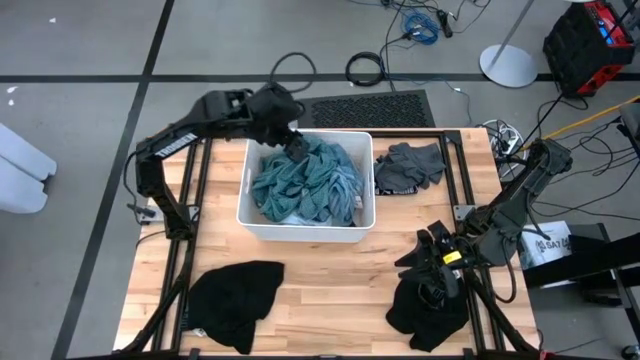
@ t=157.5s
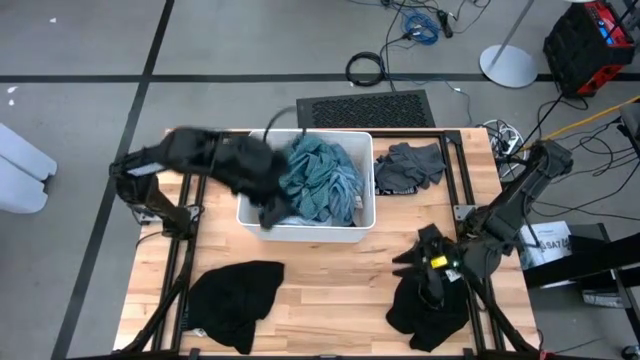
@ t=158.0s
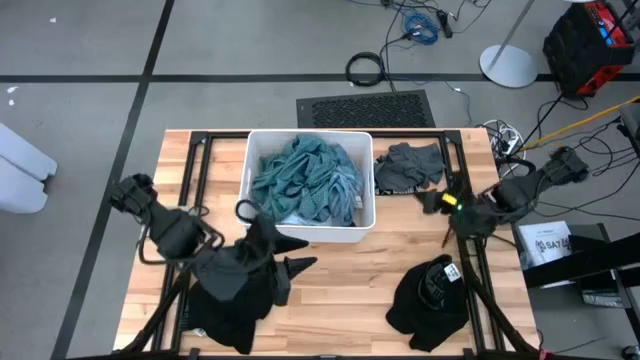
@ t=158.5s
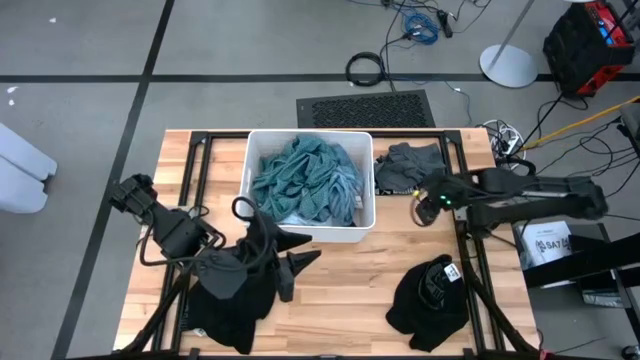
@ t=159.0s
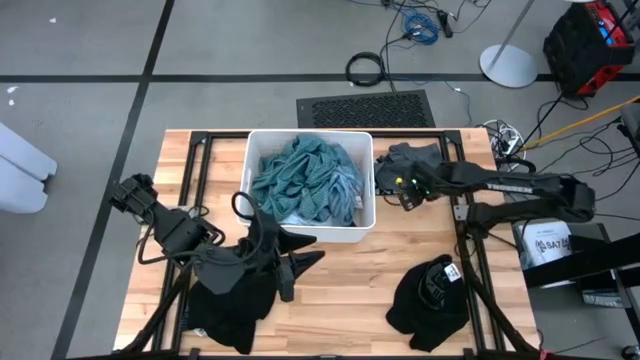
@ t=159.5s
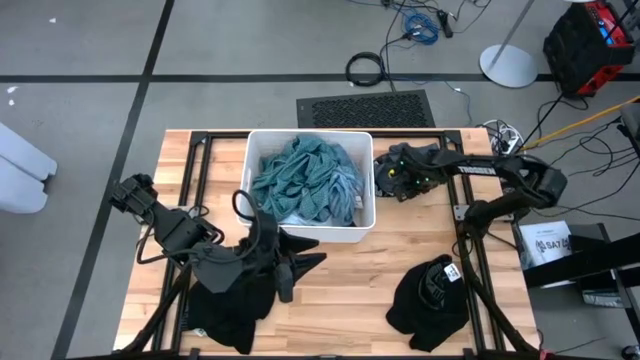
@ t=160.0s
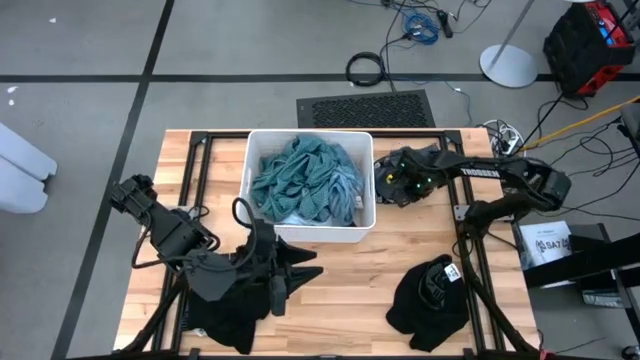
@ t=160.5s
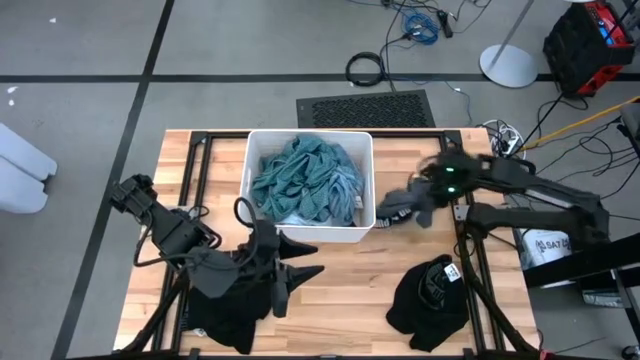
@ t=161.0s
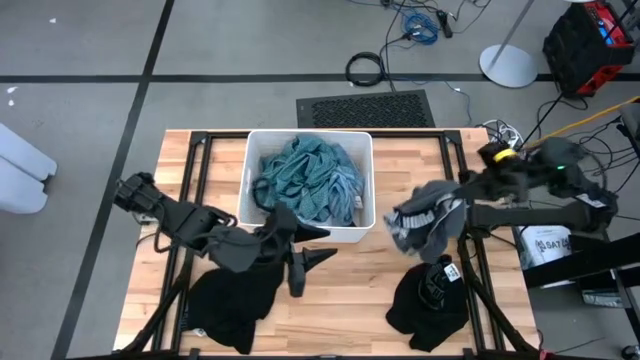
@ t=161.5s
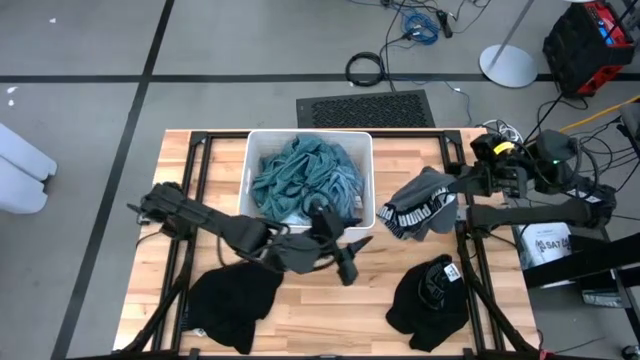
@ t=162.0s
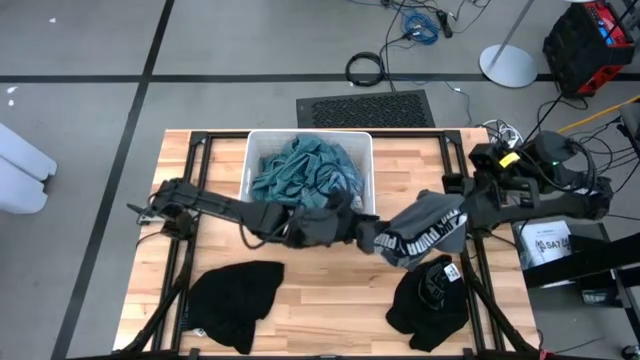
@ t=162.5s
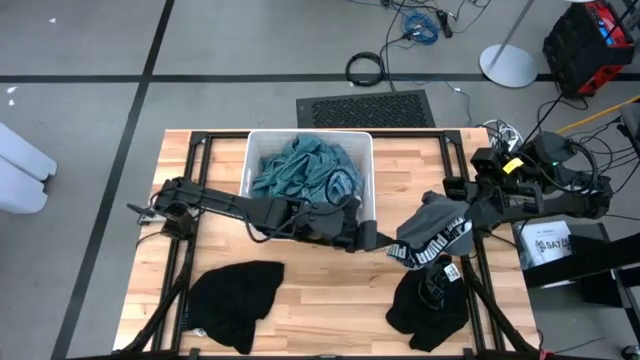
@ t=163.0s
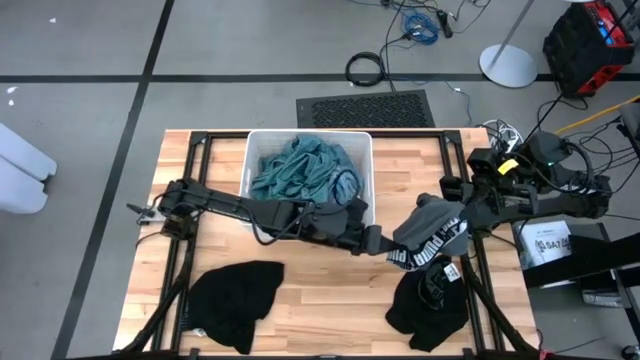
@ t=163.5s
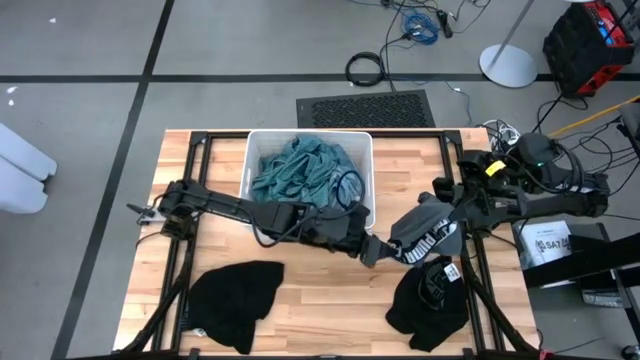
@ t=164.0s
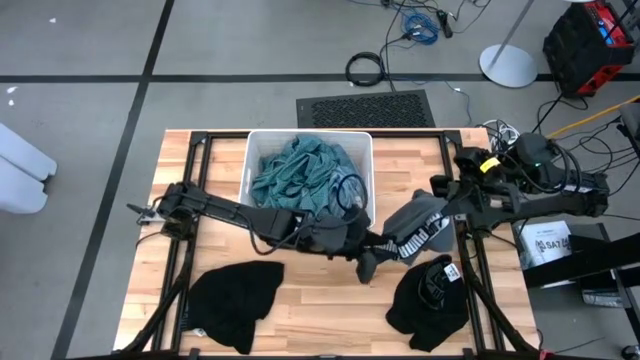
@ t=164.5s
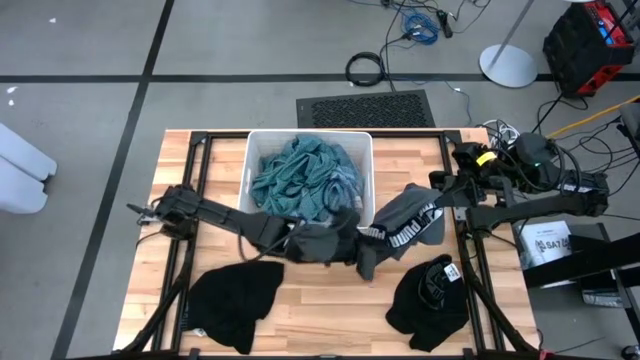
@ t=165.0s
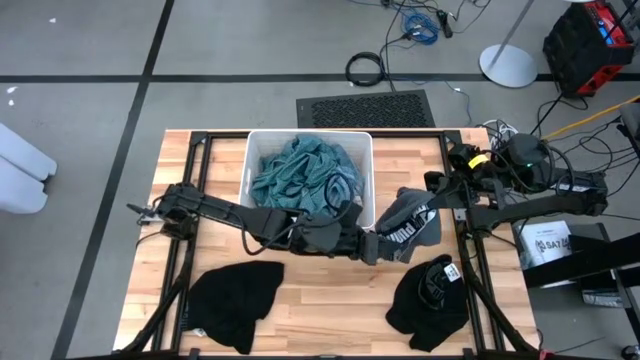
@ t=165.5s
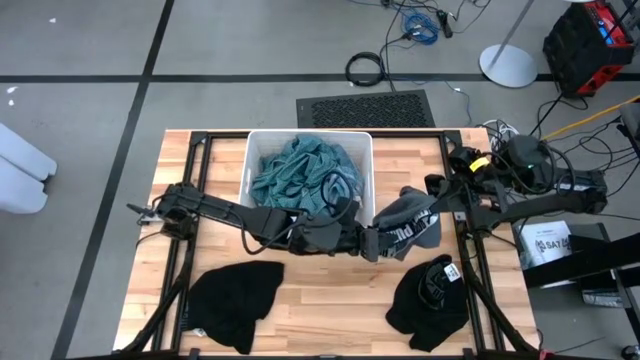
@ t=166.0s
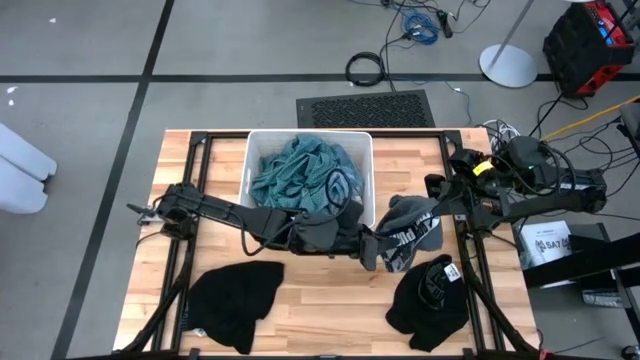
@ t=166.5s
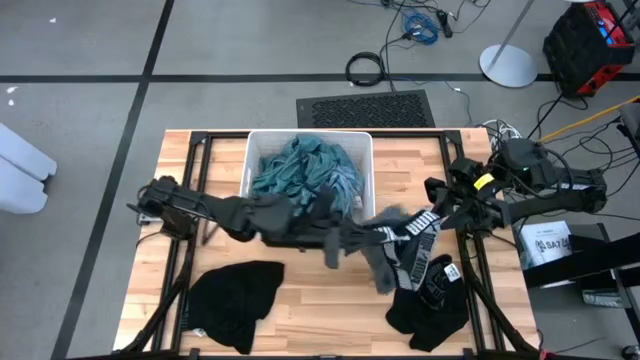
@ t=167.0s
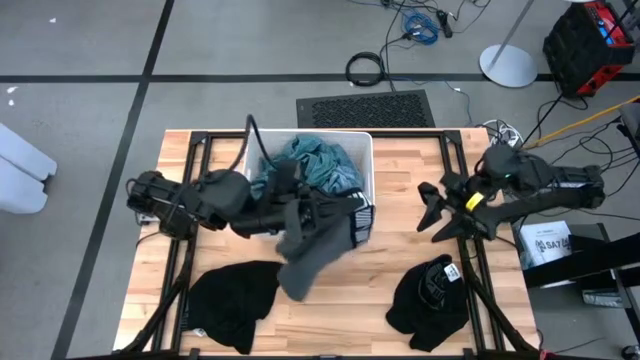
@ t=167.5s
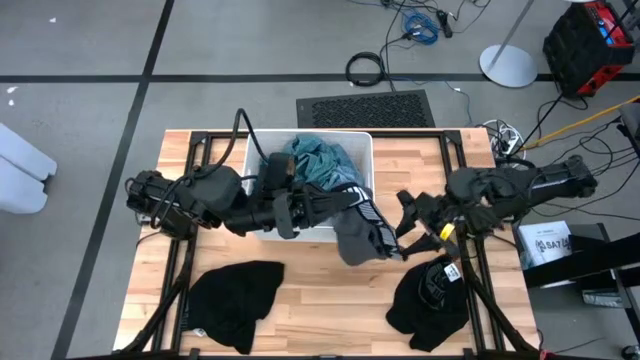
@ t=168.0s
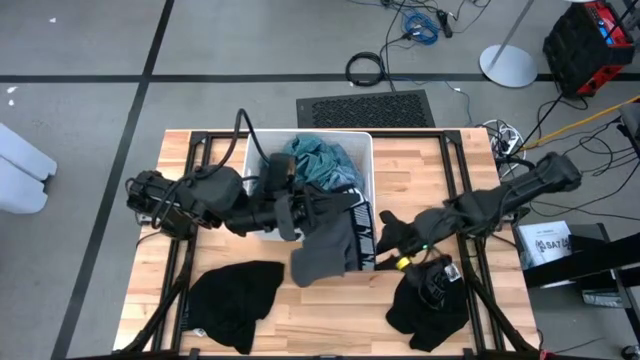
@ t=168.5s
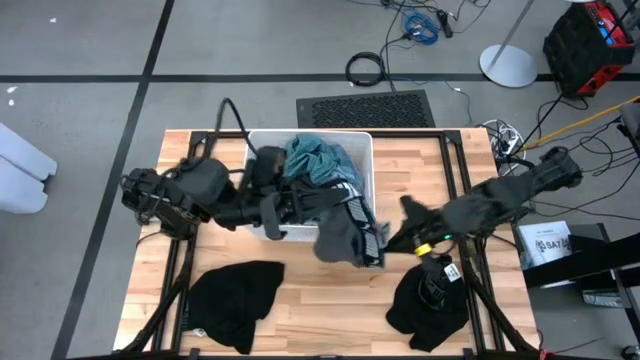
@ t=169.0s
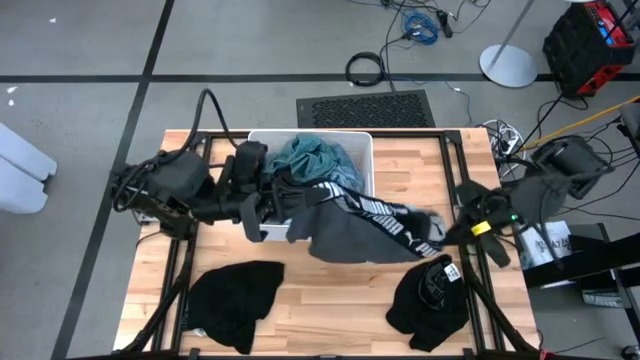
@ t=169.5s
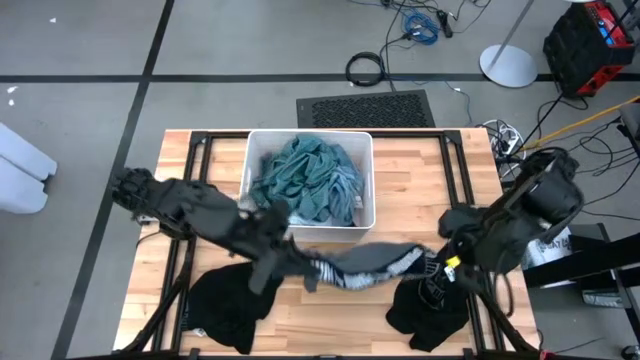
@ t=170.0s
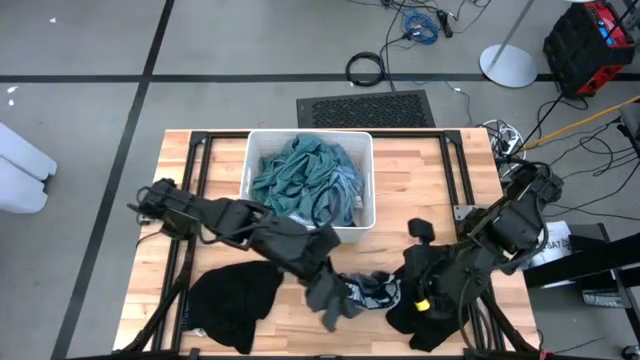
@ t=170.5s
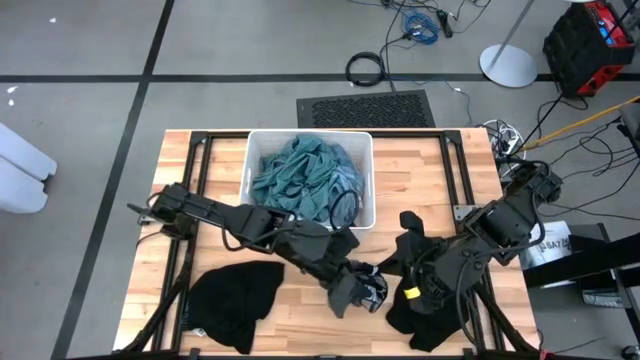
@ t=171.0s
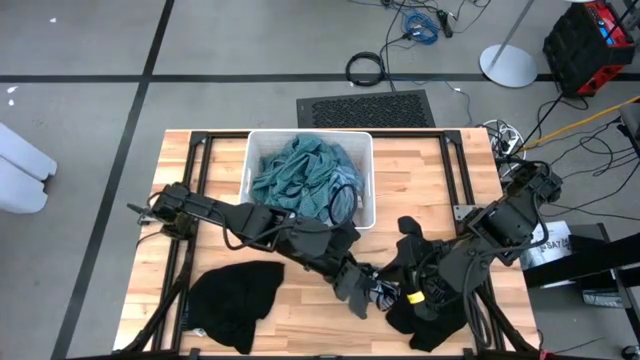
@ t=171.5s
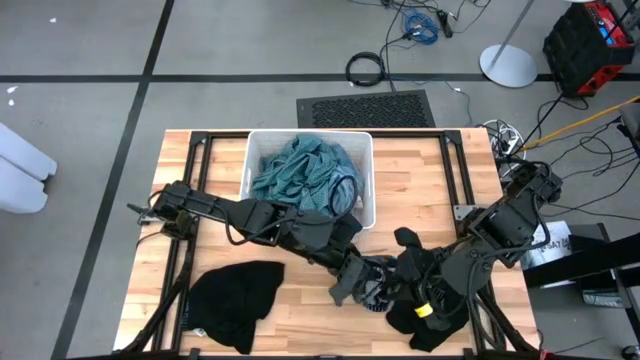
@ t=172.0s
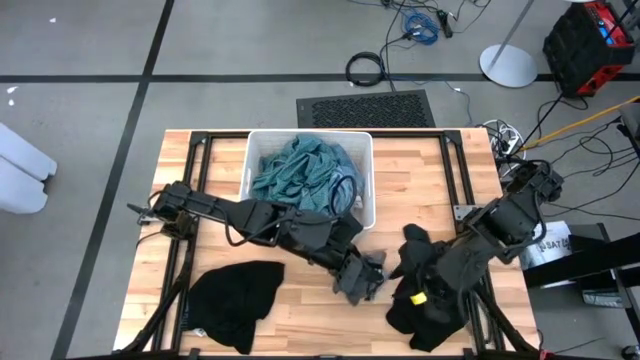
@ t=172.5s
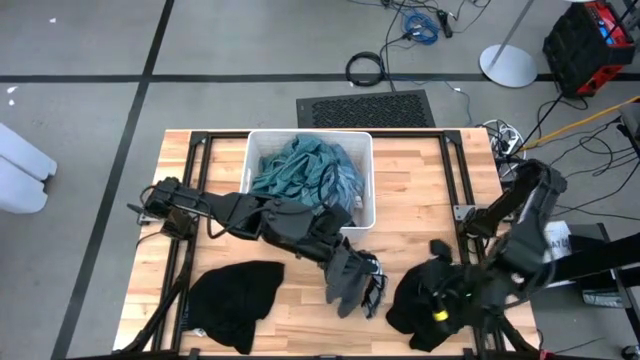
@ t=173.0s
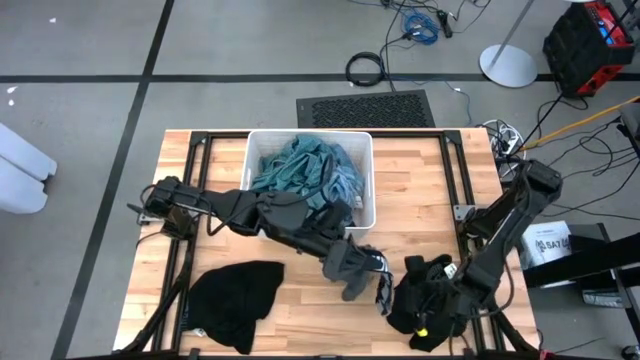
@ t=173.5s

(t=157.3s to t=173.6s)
Task: Sort clothes
Put the gray boxer into the white laundry bin

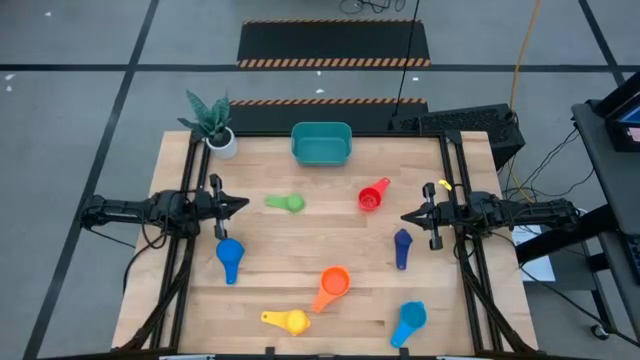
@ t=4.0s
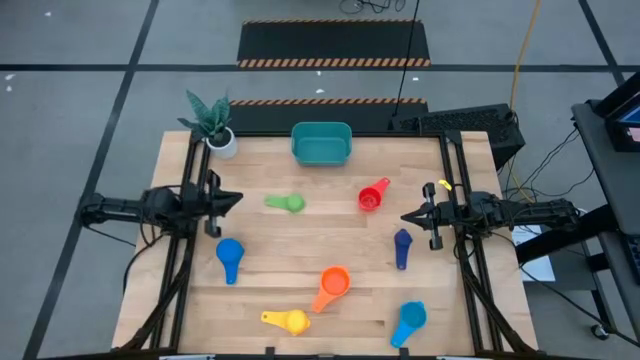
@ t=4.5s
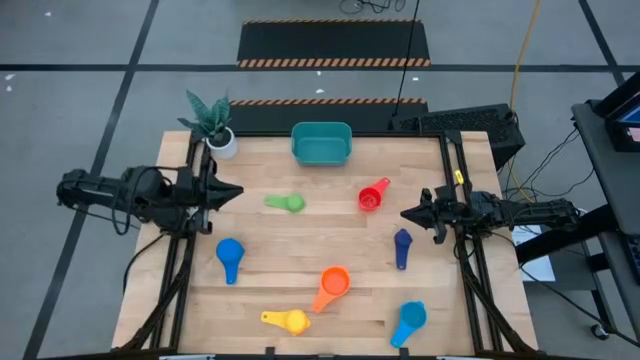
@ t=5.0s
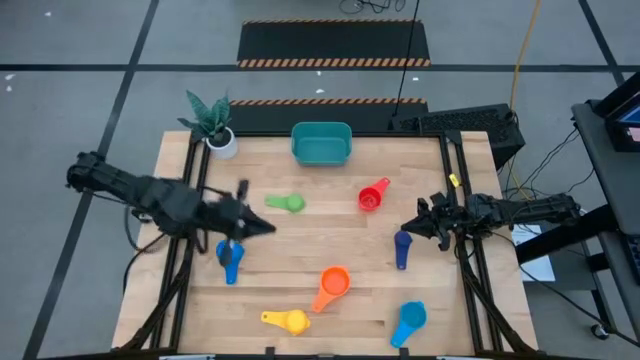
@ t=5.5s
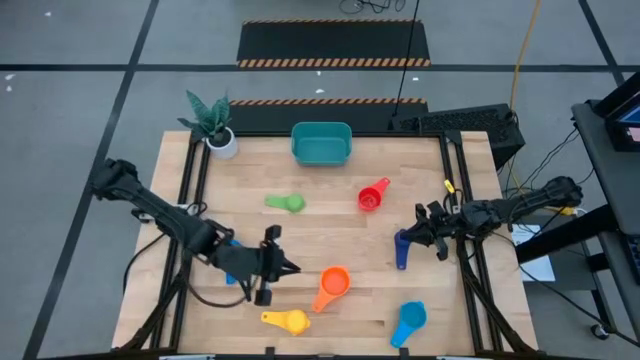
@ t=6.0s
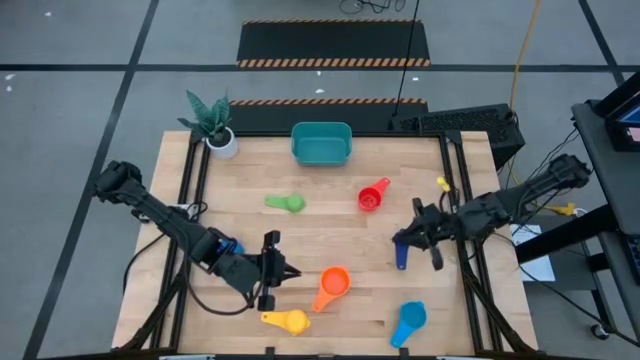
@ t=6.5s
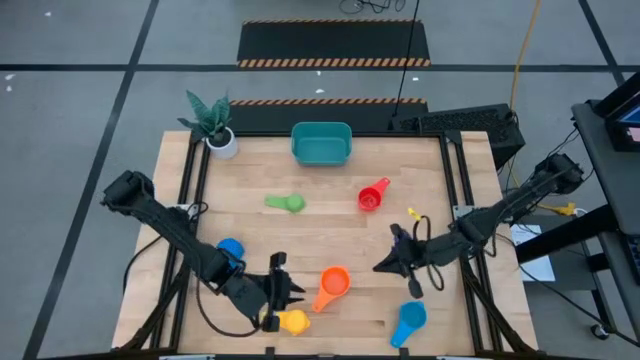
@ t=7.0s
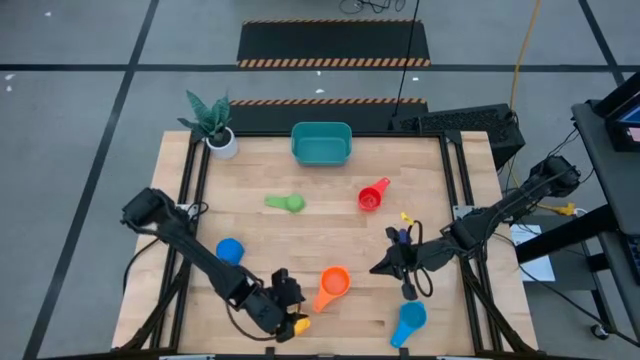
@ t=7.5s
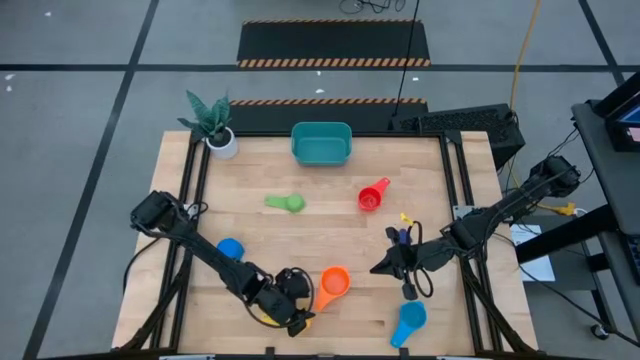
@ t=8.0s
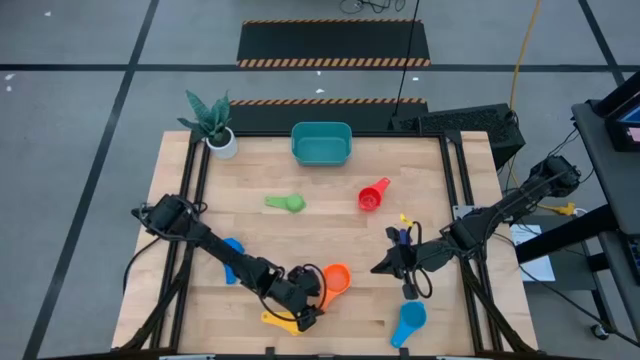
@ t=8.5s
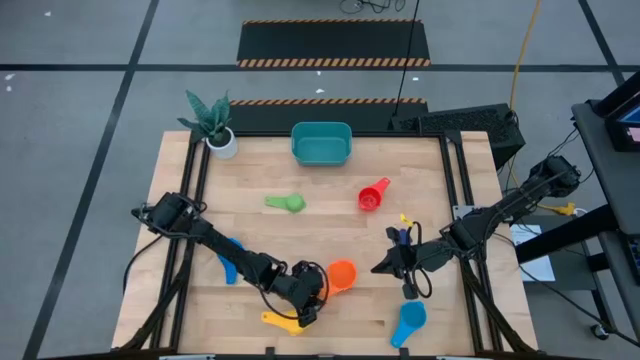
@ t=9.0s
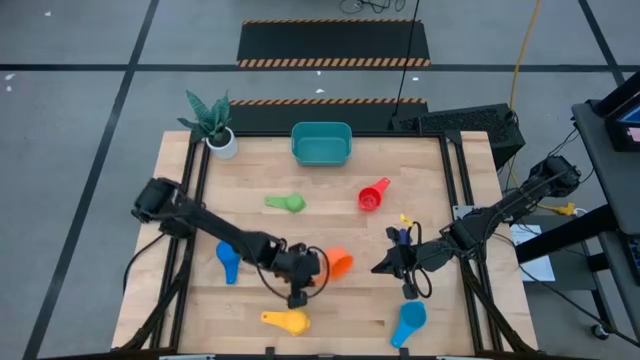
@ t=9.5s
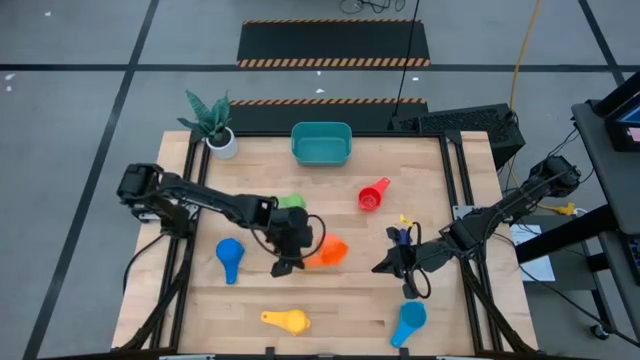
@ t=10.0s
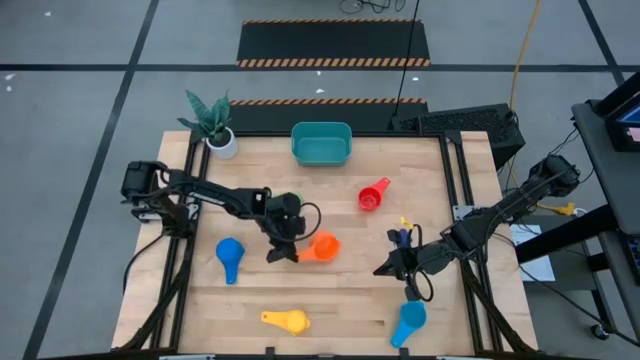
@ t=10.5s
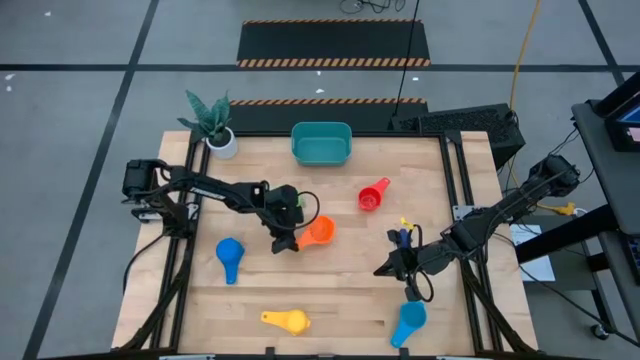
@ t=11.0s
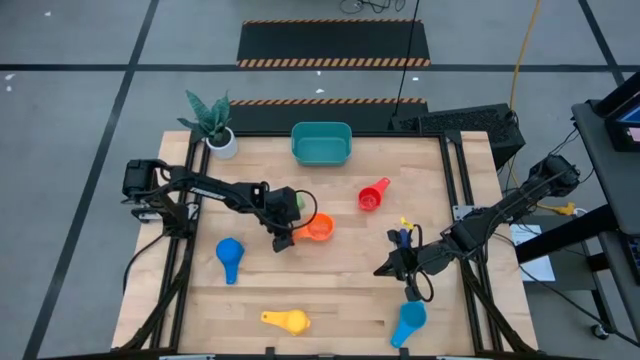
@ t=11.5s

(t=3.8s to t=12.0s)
Task: Nest measuring cups in basket
Move the orange measuring cup to the center of the table
